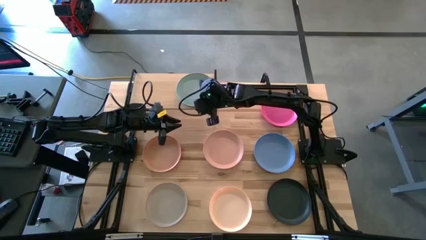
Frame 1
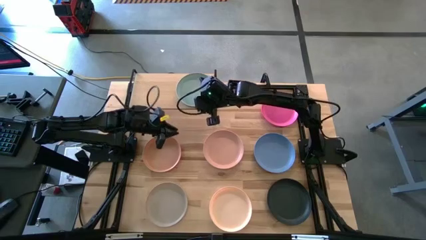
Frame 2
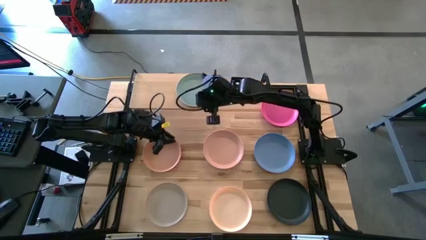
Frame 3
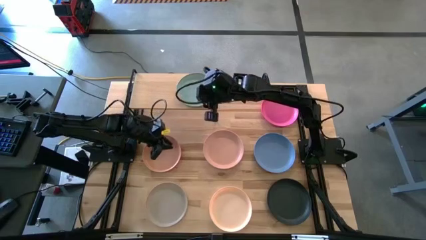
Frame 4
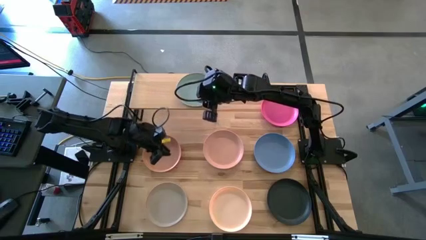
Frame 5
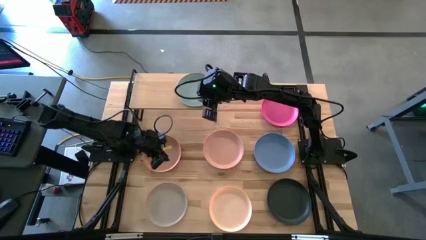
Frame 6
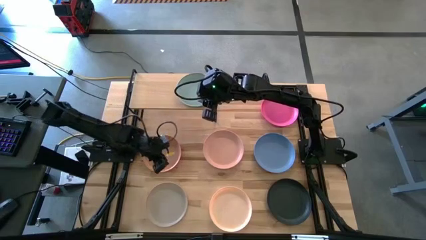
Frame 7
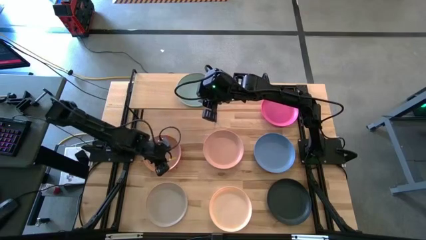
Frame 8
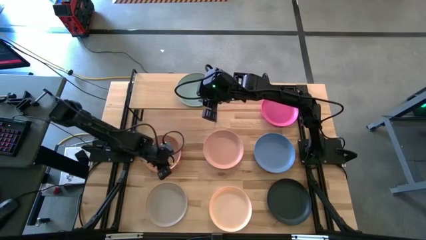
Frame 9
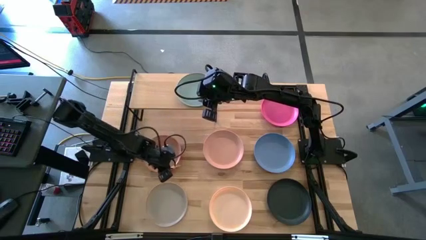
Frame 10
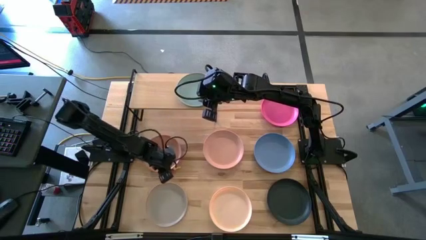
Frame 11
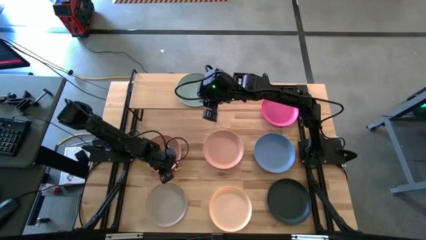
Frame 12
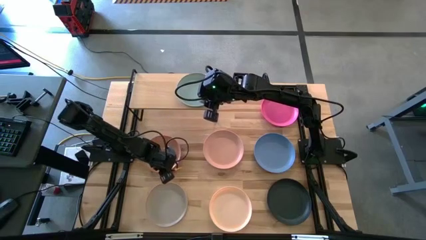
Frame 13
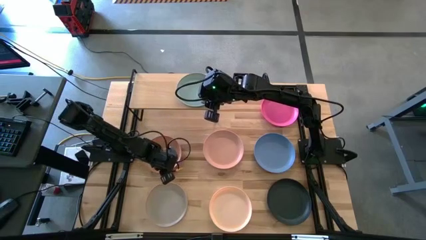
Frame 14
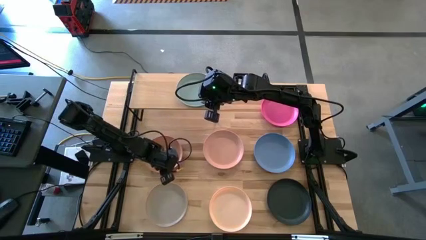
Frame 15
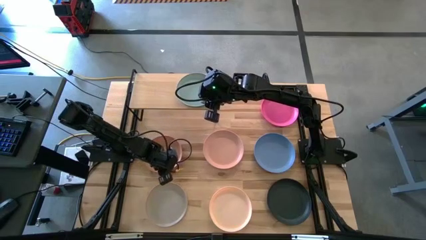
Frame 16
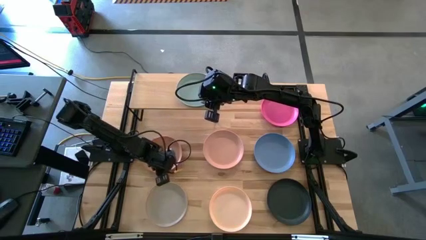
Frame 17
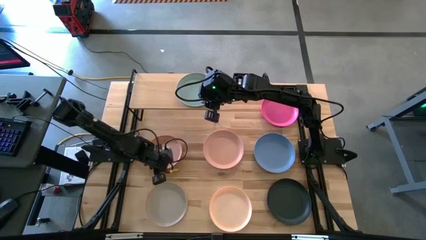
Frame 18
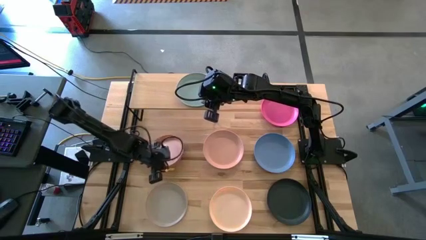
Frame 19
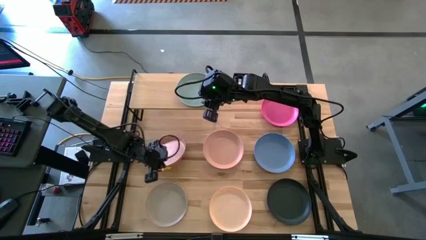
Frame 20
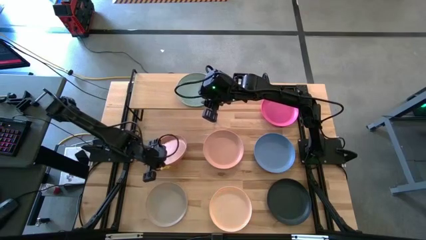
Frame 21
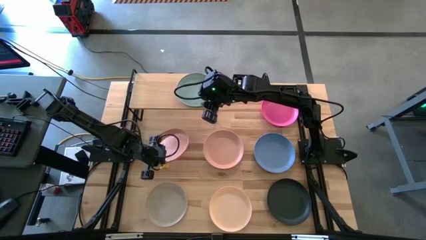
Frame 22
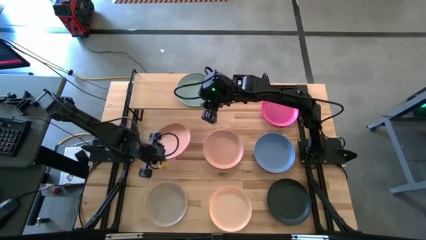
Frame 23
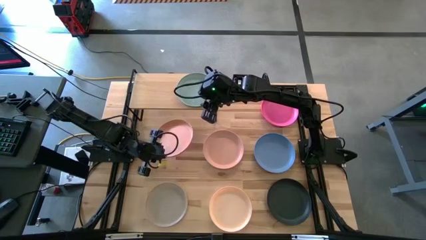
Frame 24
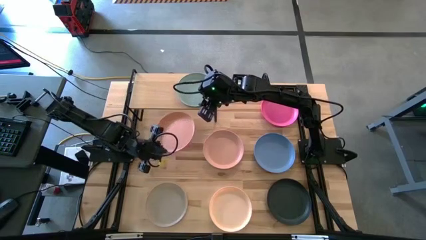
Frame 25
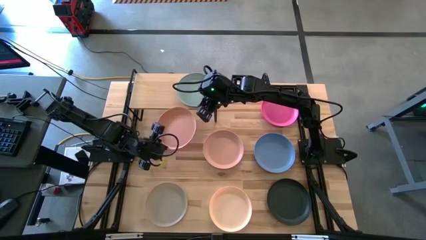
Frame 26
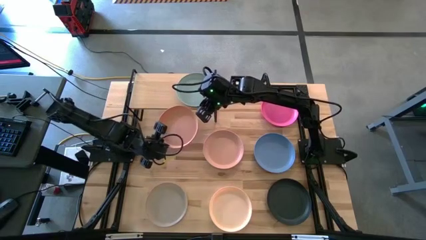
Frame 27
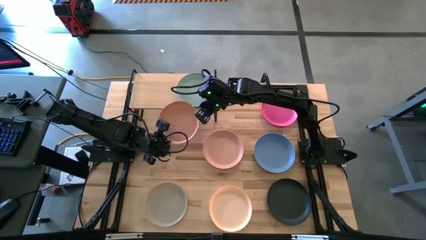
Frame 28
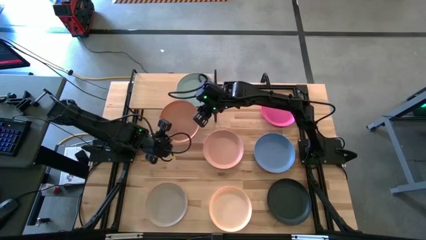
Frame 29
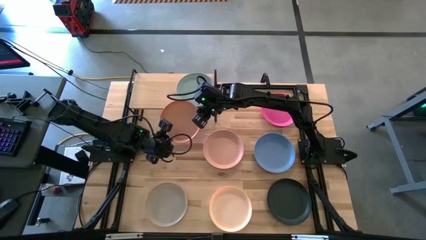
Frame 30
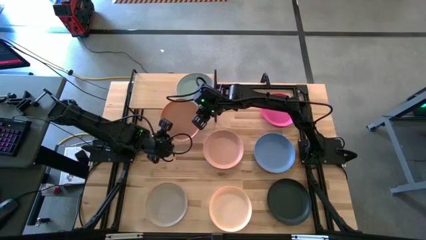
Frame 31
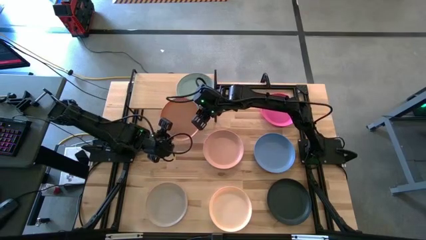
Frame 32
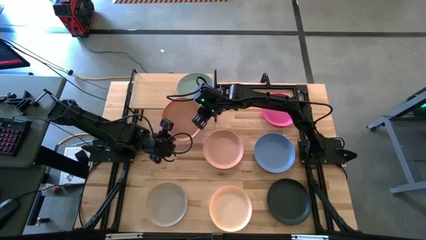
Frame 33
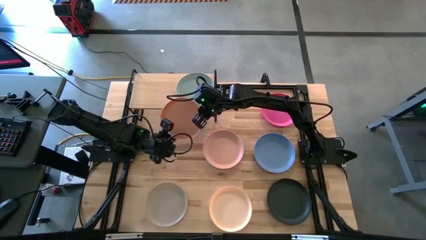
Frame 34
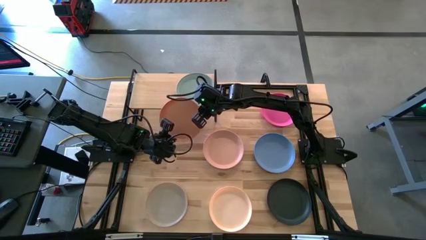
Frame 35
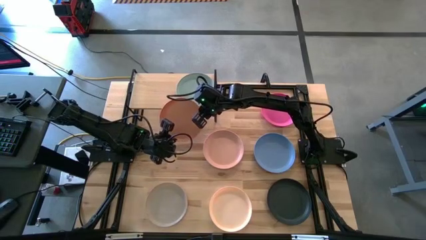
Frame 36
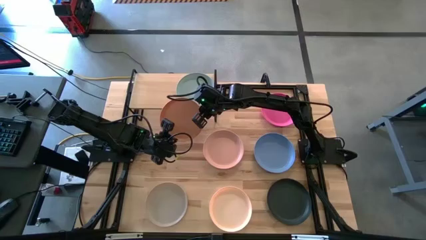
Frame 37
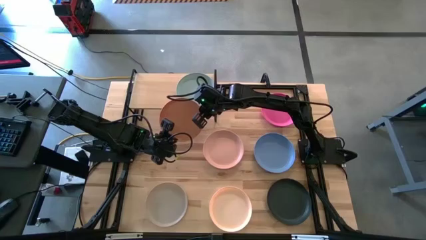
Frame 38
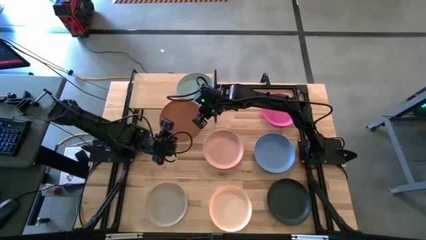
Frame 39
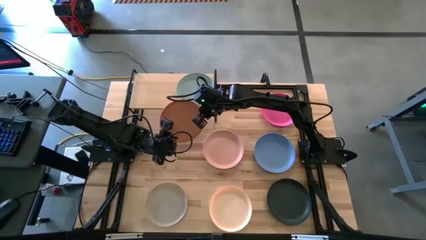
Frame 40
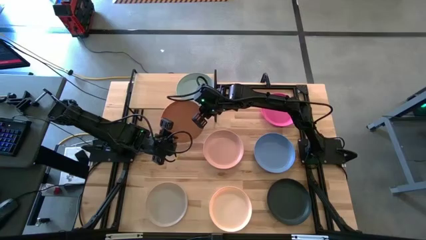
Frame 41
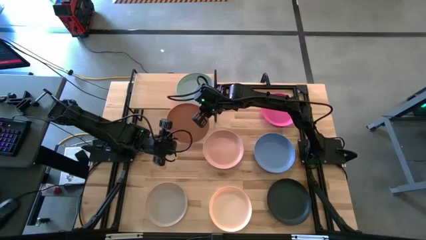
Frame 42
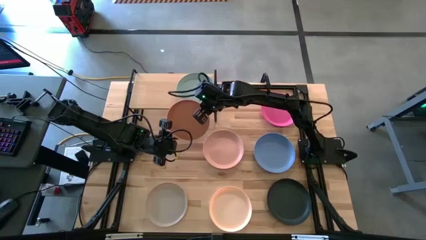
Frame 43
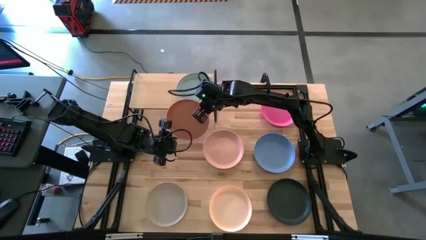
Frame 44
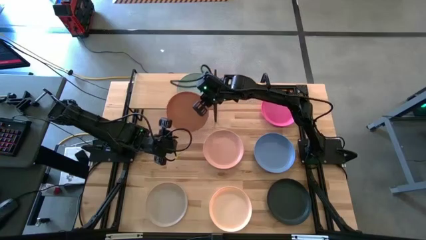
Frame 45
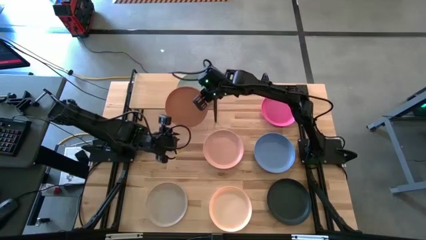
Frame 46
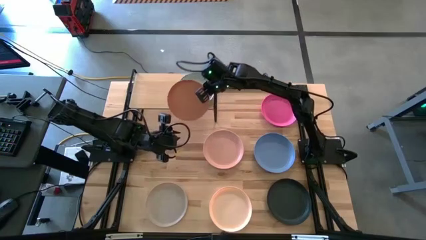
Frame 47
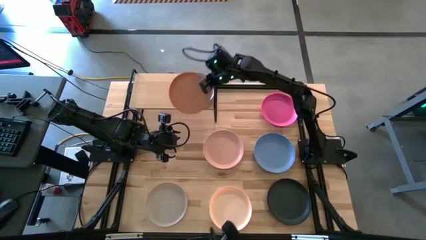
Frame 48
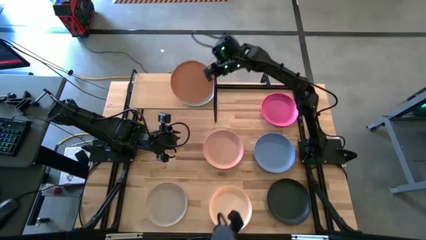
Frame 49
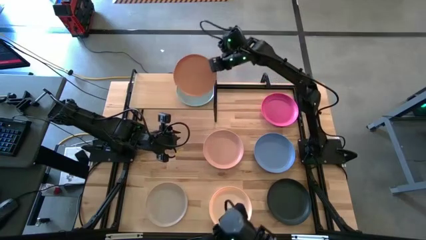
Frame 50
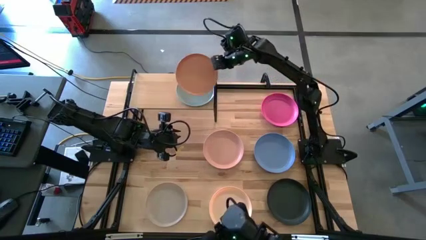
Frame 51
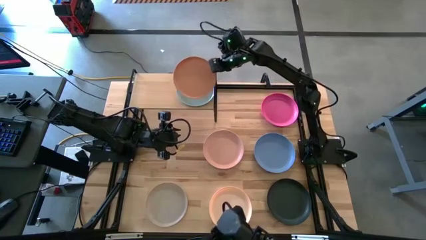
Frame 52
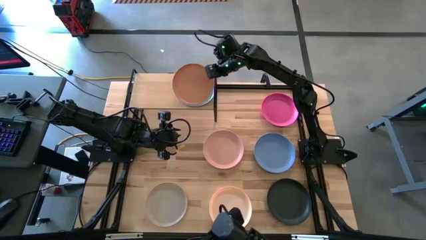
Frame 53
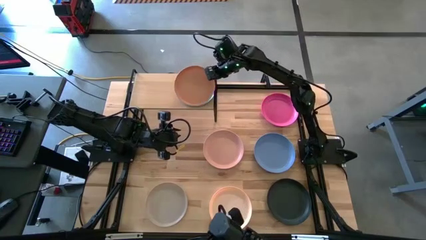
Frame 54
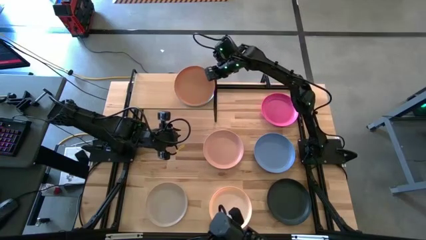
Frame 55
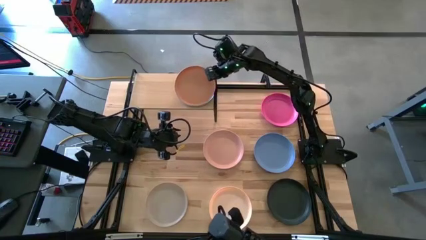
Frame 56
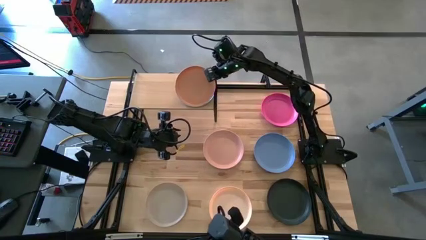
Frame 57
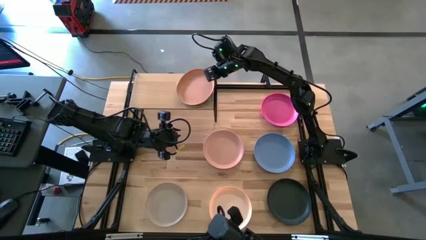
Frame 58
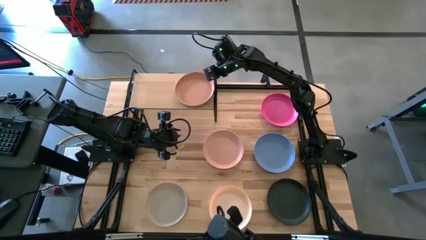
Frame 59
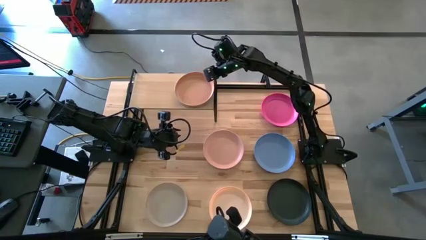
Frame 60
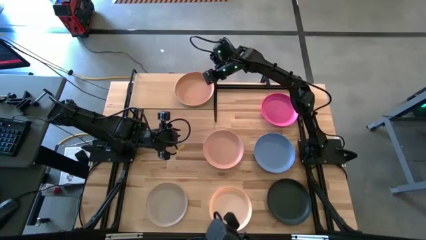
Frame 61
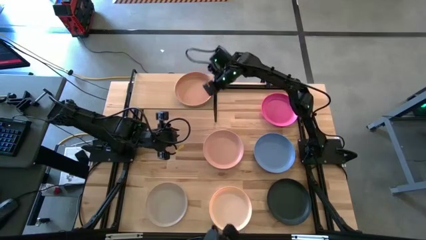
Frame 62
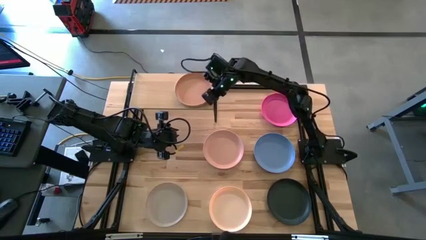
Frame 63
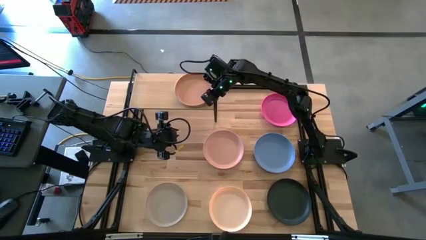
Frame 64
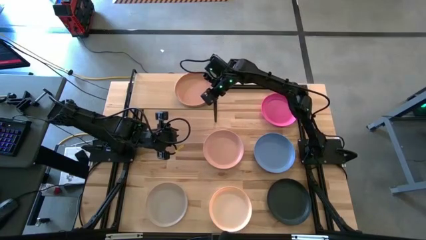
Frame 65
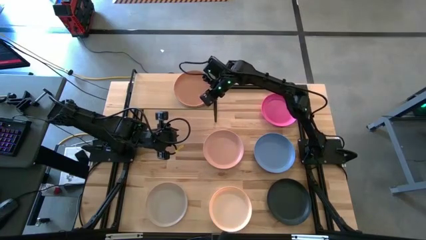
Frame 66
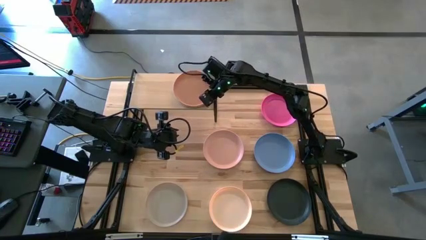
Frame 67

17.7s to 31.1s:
Task: Place and stack plates onto a shelf
Stack the brown plate on top of the blue plate on the shelf
